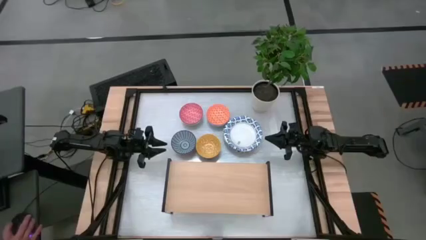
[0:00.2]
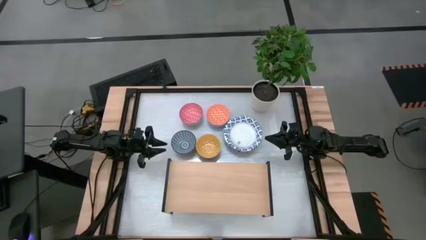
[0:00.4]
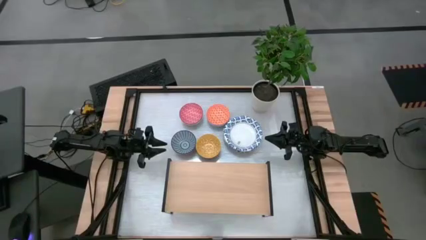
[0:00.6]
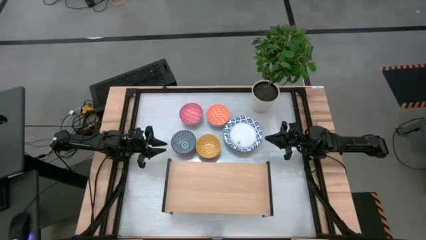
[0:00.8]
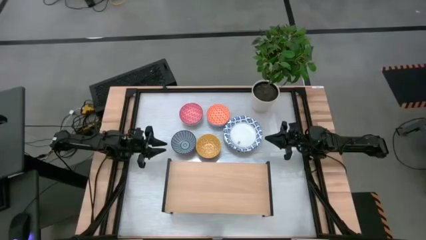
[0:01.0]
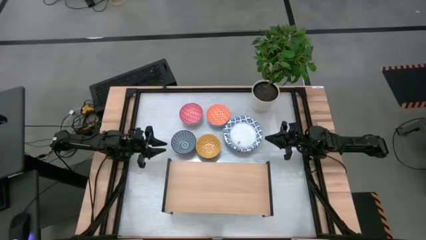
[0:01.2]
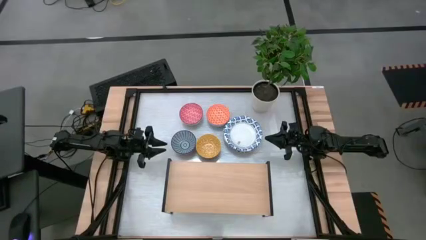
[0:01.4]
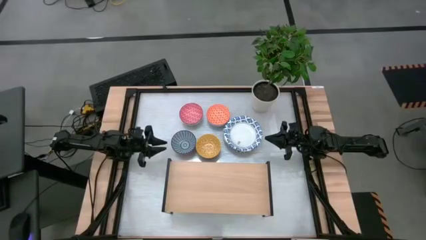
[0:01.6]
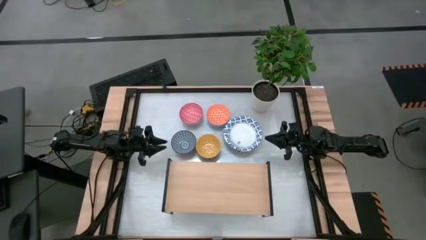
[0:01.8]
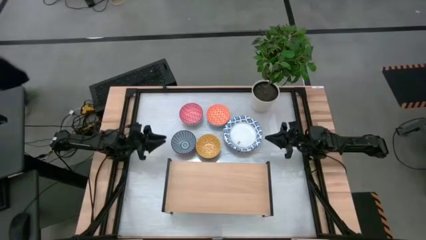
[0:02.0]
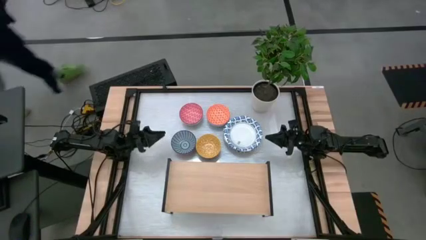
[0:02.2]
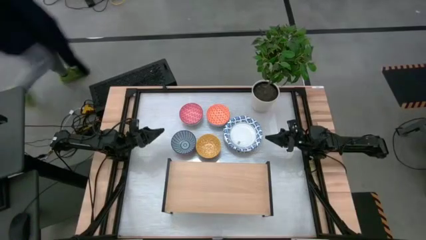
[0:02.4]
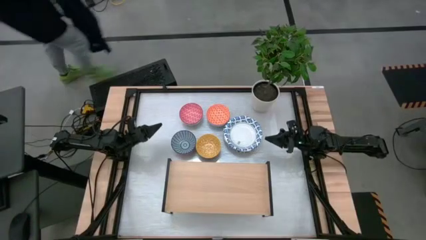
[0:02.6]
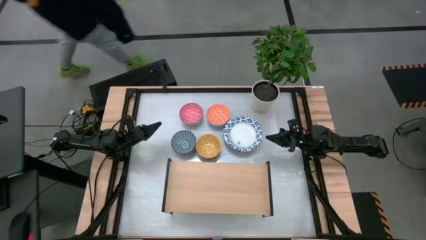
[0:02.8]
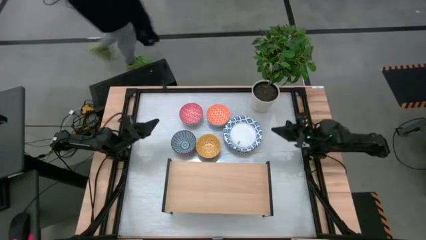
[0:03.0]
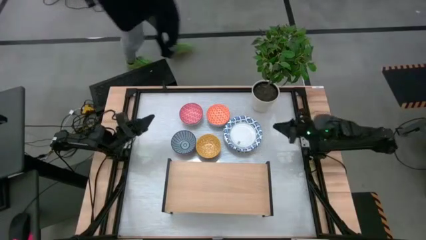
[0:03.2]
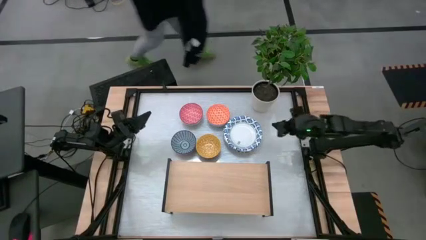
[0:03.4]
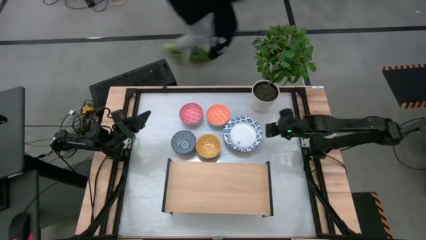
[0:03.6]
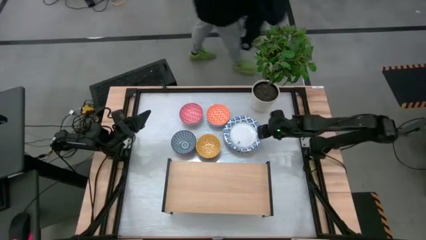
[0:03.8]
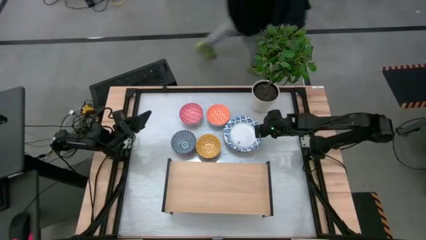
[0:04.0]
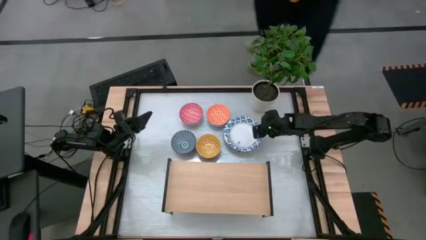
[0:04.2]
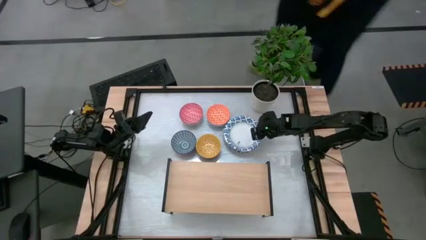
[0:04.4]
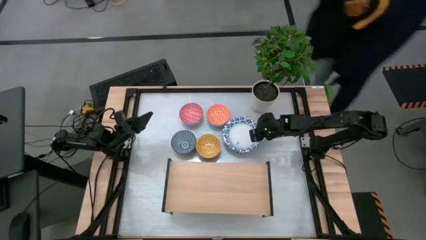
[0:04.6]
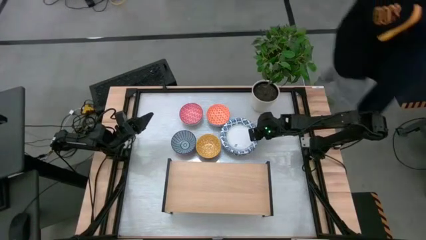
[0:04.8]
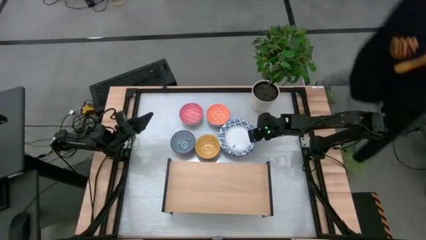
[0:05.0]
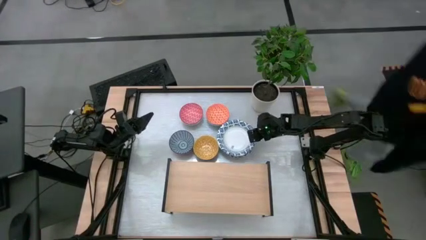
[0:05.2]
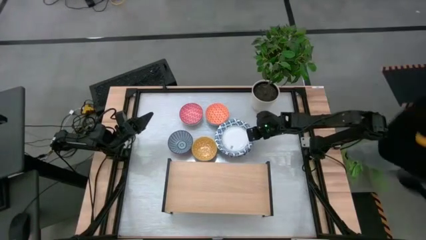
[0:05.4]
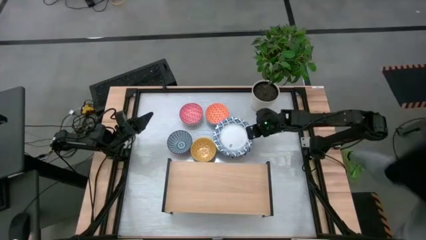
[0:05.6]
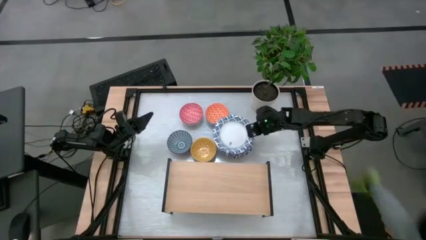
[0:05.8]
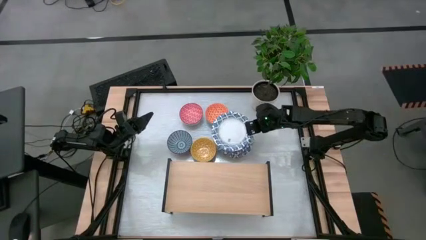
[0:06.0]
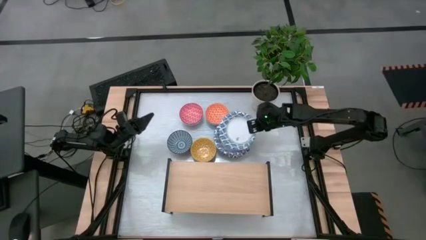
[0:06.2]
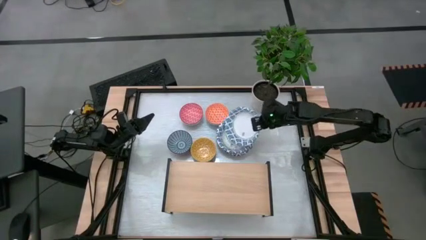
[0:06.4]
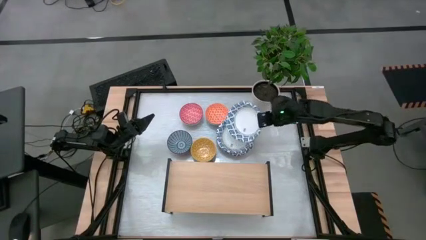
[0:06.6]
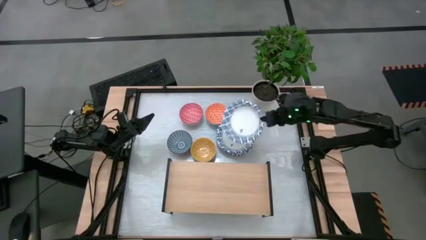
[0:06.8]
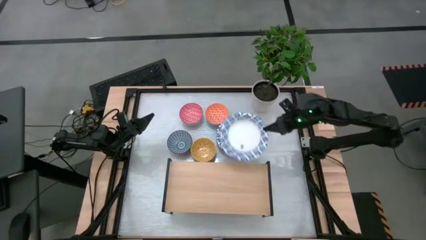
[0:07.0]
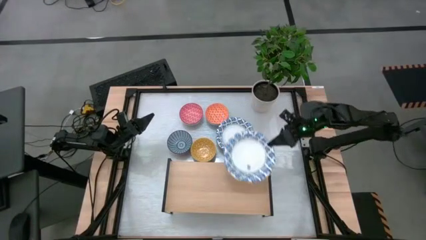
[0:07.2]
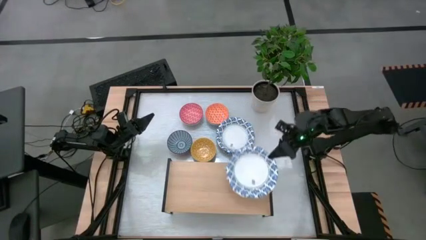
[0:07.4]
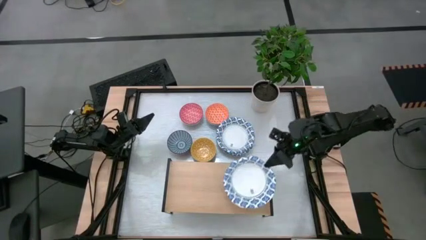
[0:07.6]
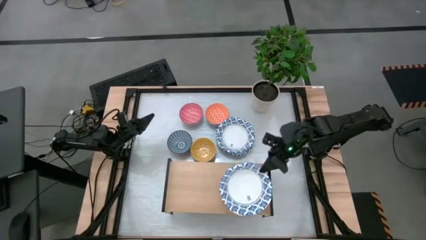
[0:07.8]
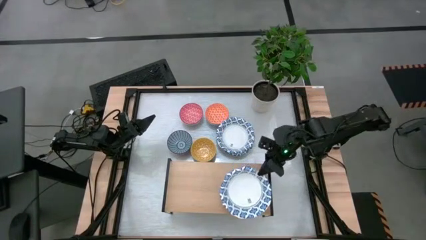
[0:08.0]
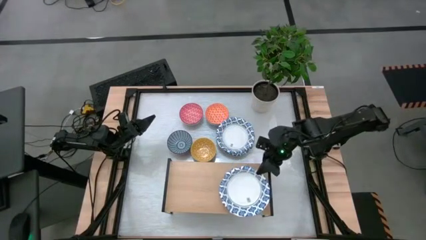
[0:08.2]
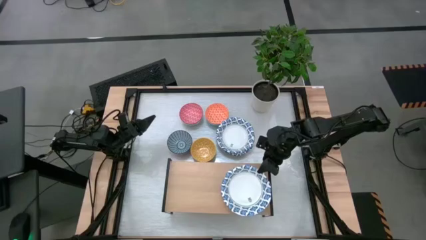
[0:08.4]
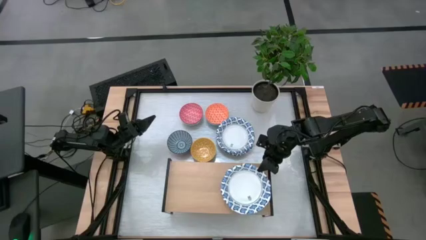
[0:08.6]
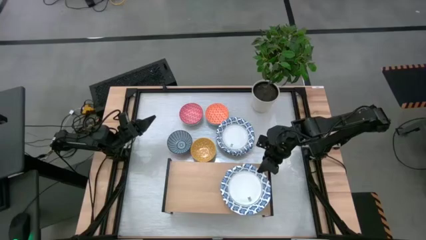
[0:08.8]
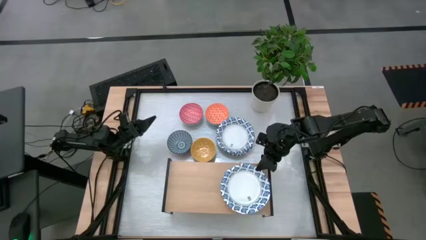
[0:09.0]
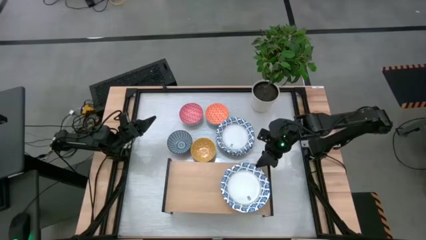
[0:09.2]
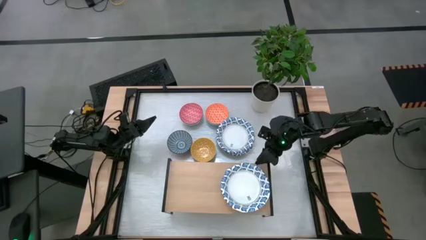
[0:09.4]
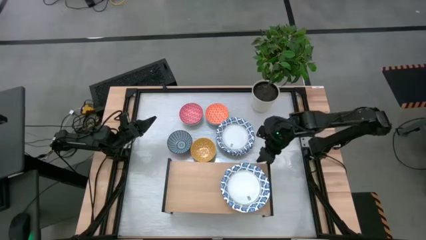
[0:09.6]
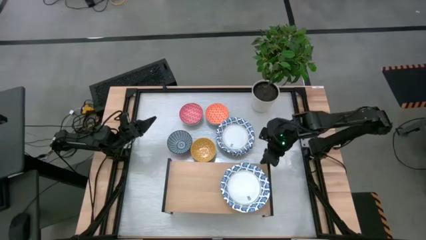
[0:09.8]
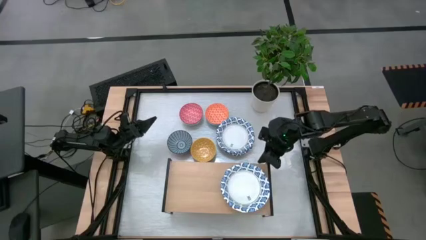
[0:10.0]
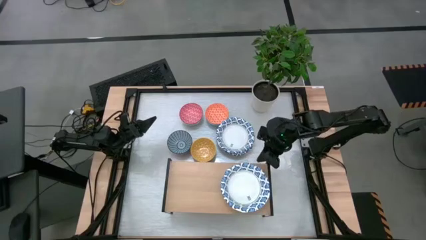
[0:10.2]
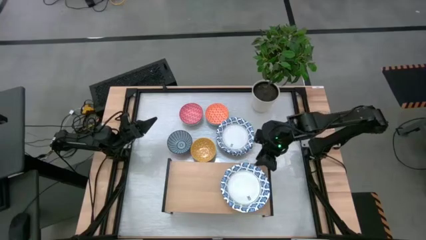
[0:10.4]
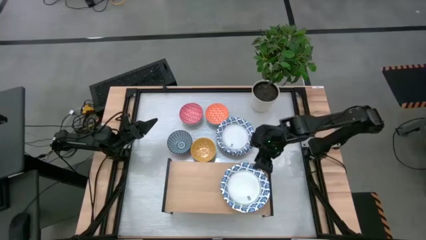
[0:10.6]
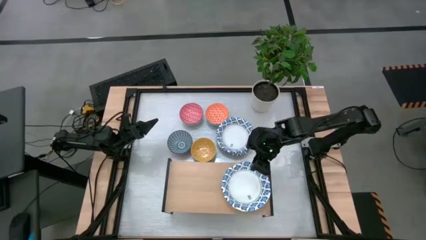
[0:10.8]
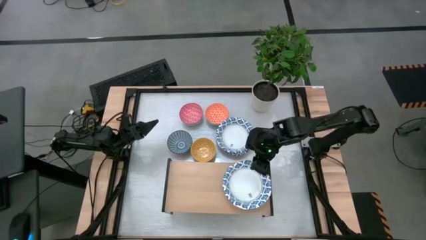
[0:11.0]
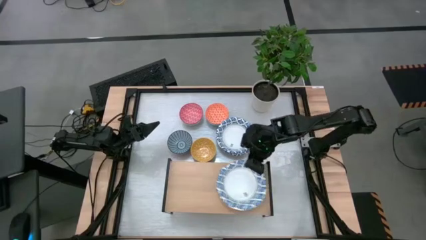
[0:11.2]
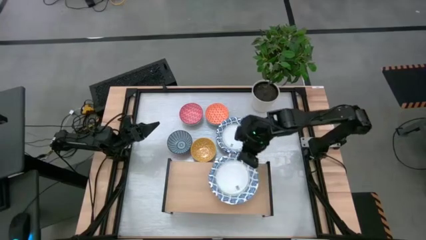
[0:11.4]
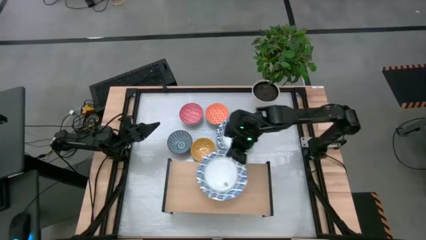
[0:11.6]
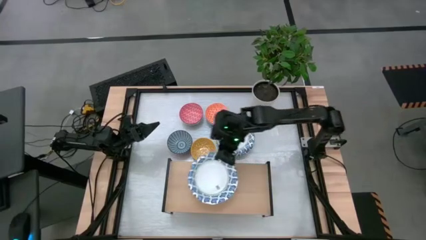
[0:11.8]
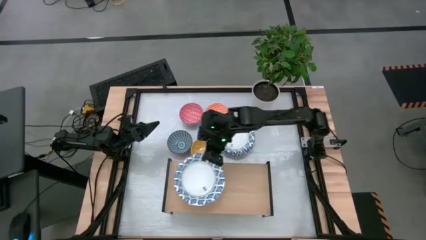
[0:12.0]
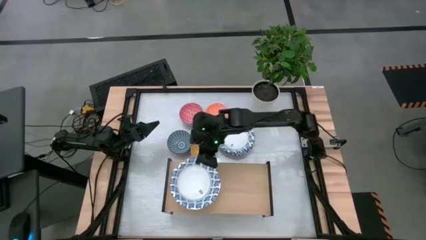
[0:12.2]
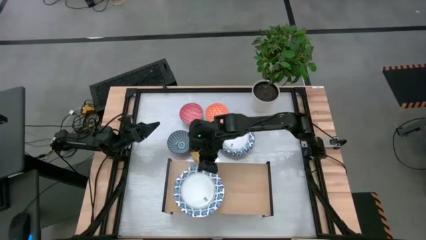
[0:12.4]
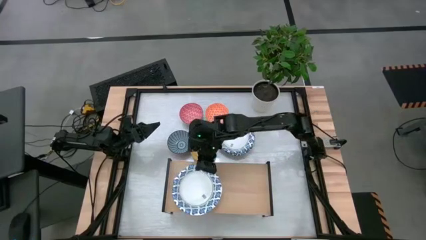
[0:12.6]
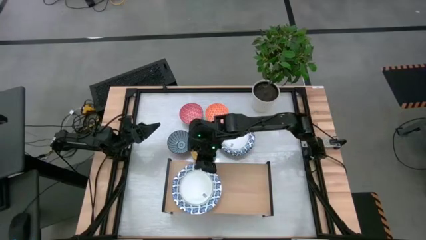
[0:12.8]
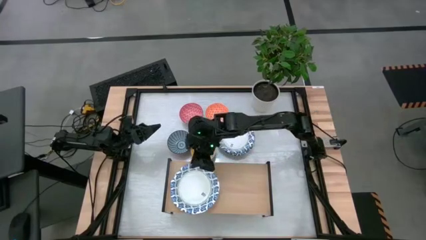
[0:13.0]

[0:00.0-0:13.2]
Task: Place and stack bowls onto a shelf
Put the white patterned bowl on the shelf
